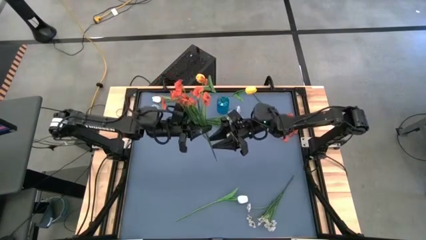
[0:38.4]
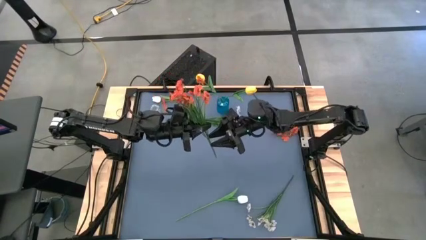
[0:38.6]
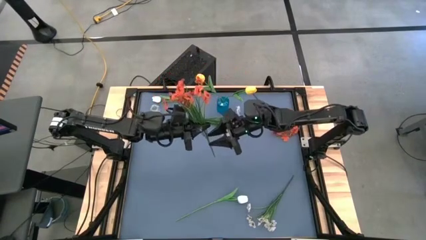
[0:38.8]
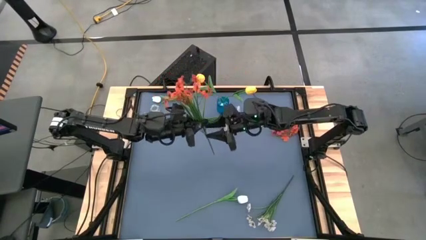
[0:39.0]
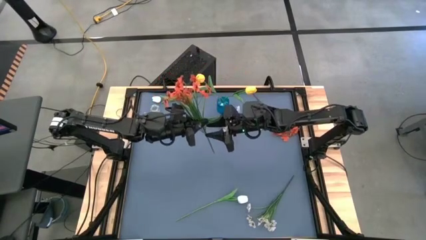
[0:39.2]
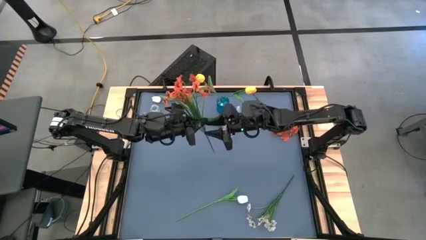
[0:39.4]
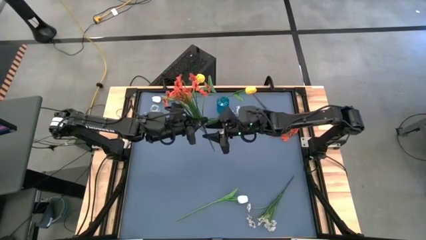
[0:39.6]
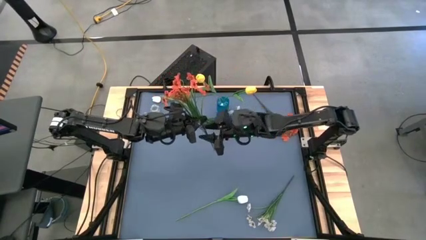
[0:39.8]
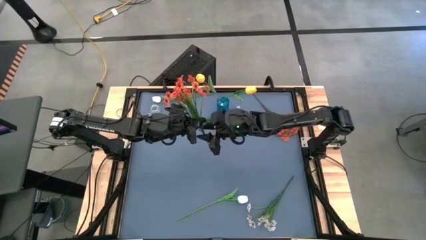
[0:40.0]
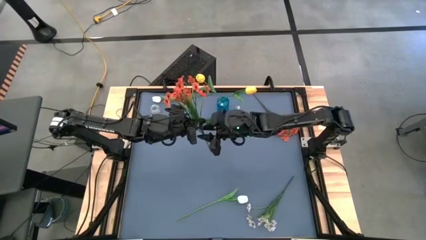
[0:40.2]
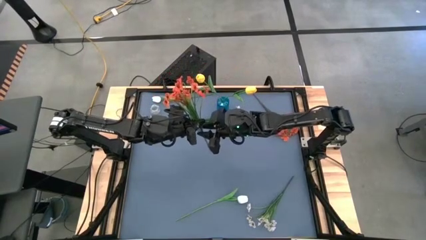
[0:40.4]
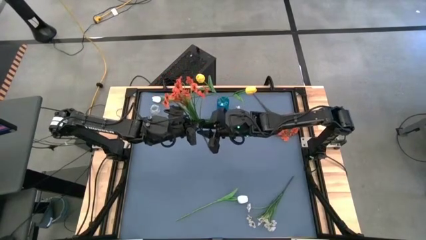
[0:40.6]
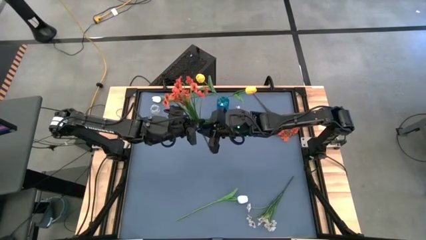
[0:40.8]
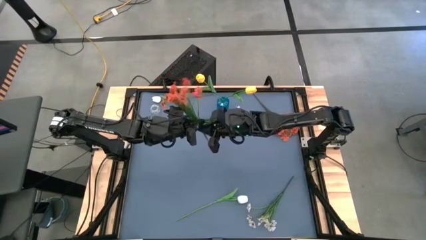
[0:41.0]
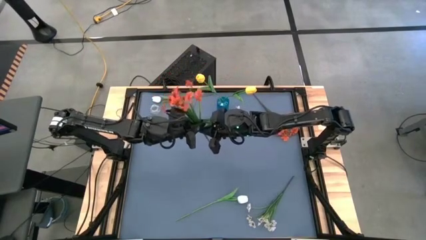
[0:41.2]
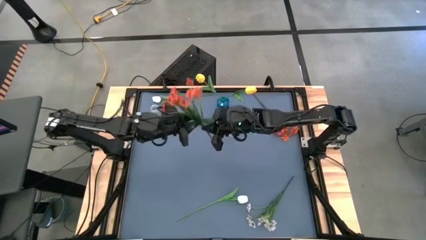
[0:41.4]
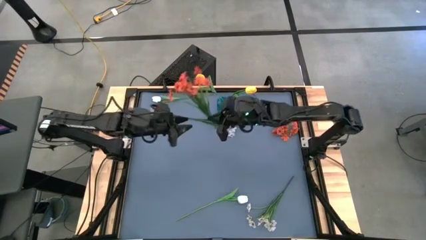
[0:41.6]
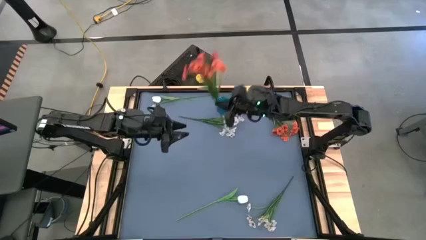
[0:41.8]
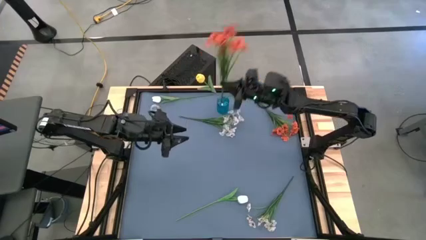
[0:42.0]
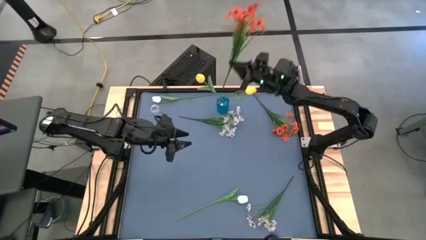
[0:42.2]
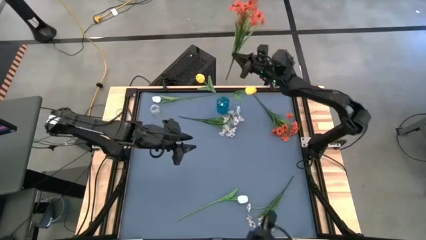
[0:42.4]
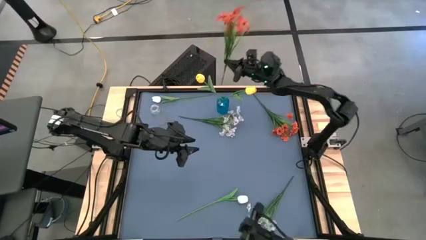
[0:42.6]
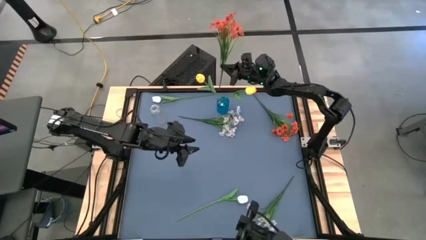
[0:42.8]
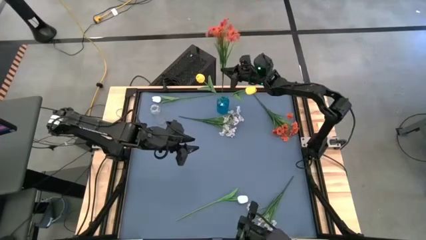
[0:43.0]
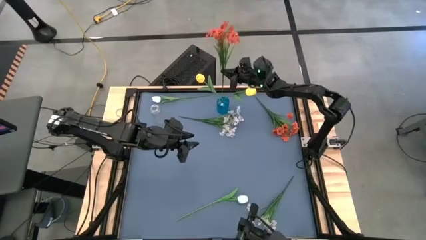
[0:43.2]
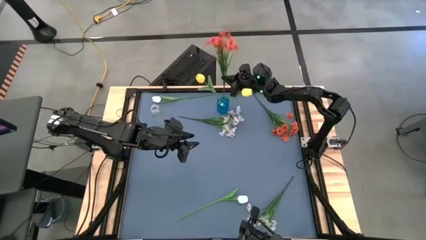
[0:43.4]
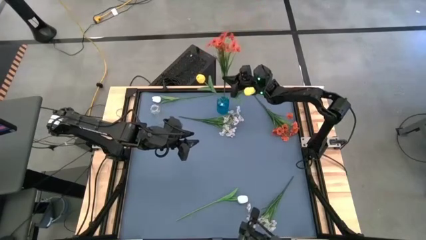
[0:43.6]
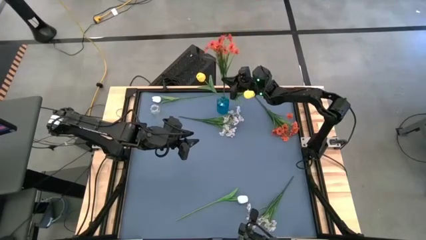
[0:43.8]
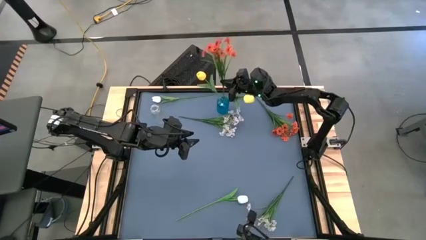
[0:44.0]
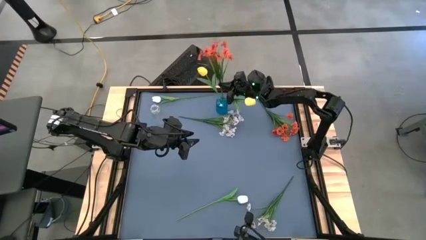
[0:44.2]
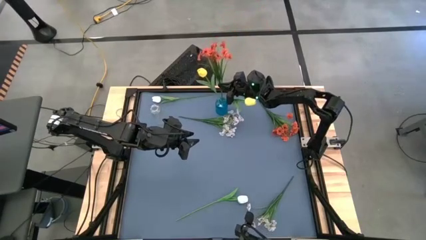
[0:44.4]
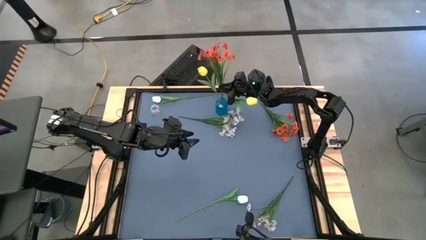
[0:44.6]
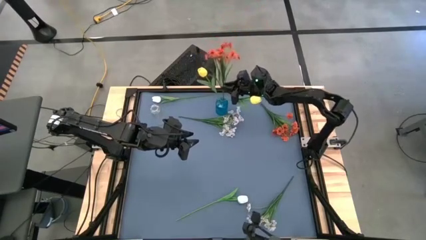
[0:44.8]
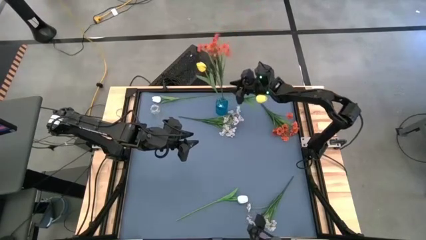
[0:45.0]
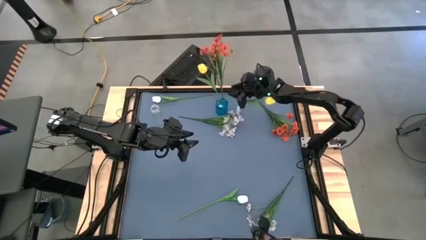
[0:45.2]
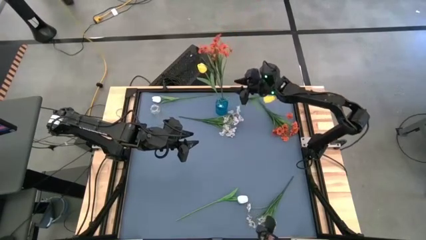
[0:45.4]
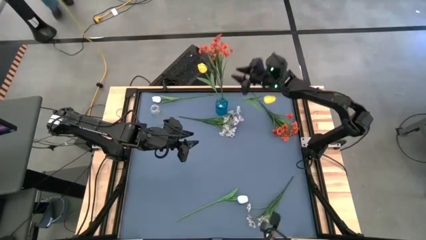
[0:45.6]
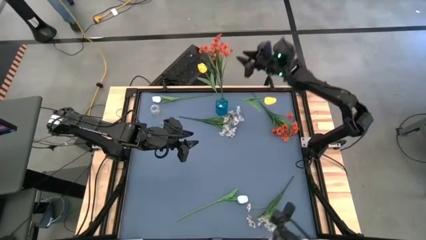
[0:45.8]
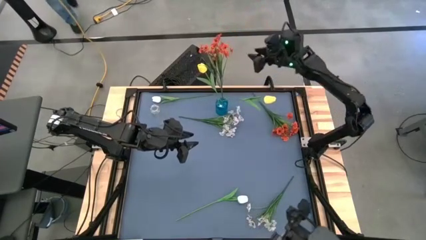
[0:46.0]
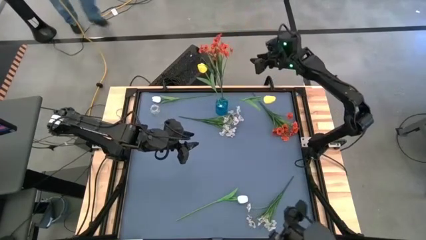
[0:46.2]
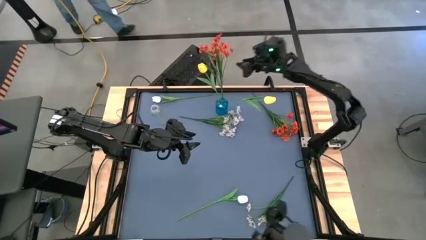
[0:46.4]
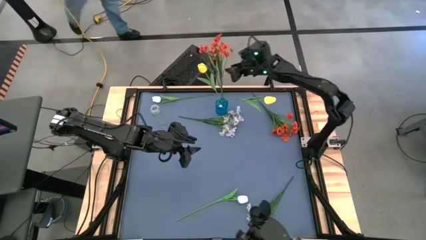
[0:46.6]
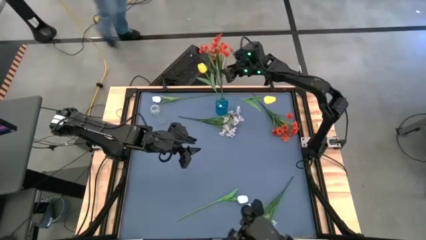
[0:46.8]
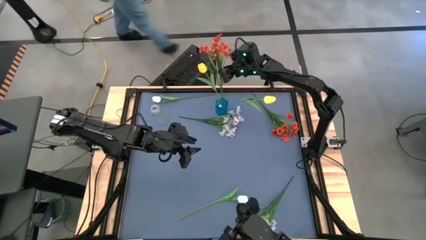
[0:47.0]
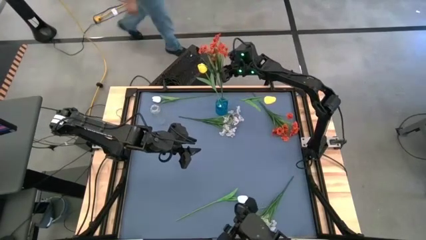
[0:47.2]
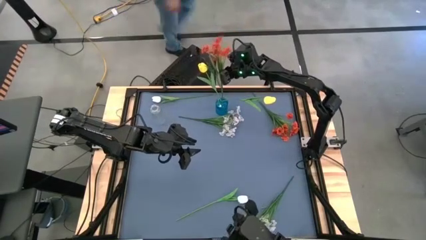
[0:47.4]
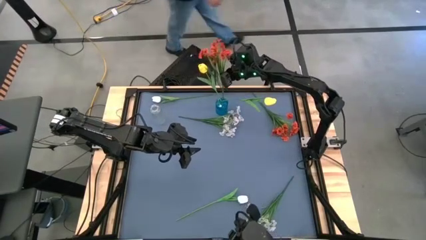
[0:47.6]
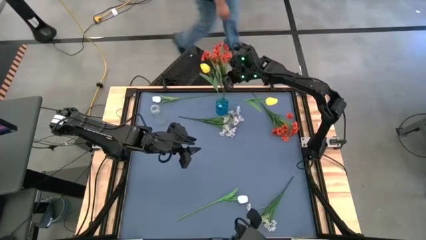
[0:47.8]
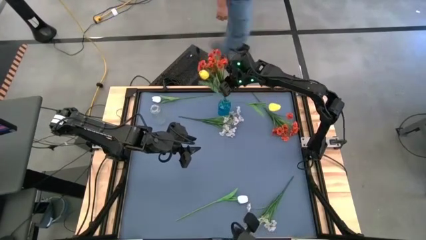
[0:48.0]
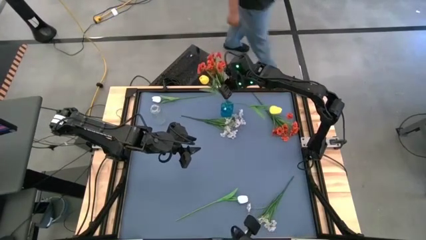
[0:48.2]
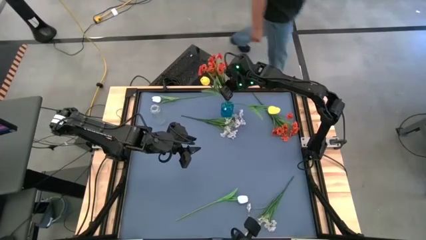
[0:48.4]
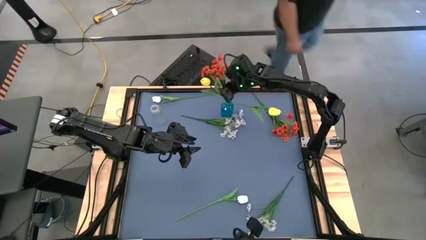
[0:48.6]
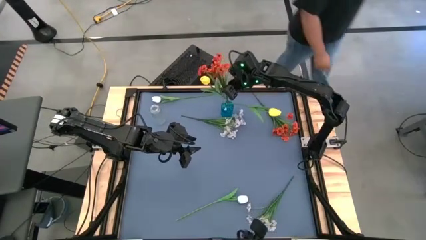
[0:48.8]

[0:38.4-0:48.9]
Task: Sort flowers into vase by color
Put the bottom orange flowers into the blue vase

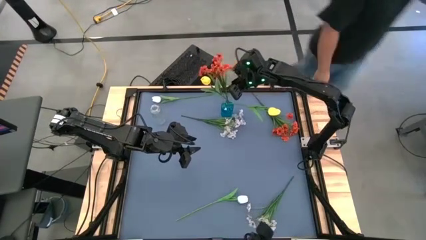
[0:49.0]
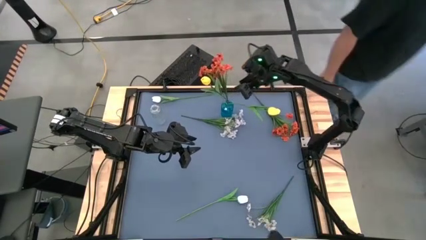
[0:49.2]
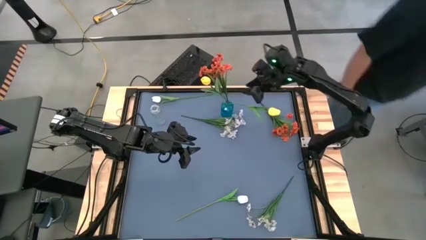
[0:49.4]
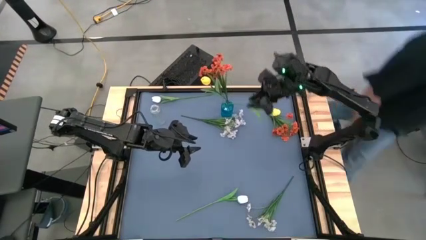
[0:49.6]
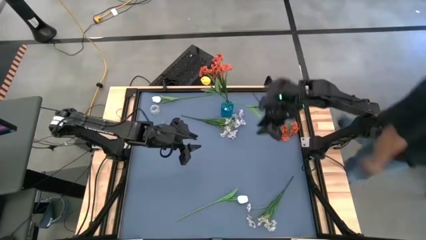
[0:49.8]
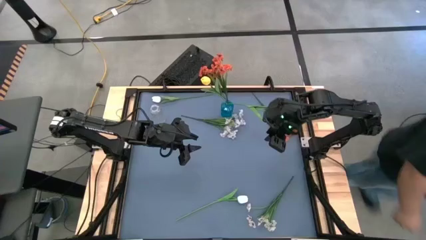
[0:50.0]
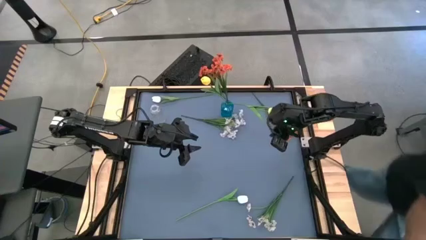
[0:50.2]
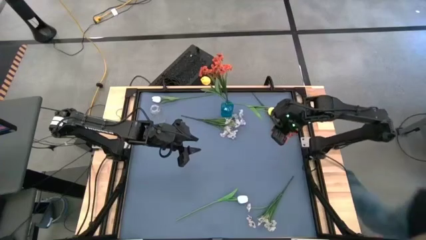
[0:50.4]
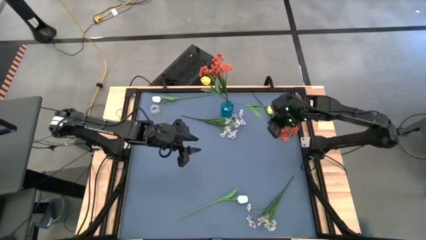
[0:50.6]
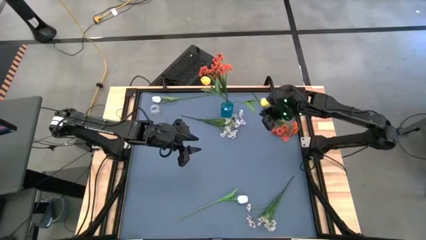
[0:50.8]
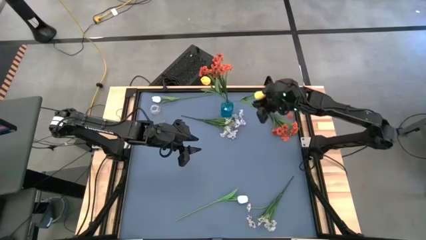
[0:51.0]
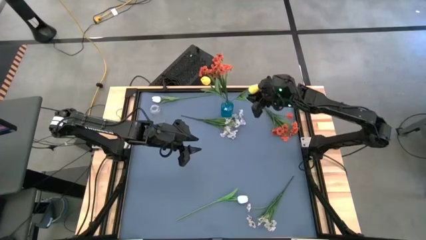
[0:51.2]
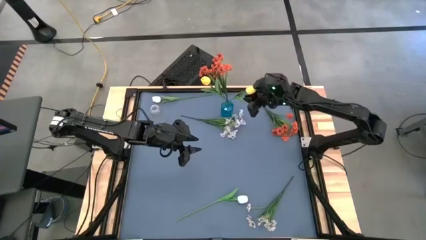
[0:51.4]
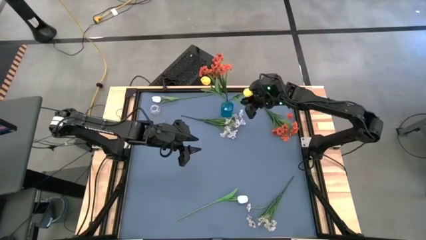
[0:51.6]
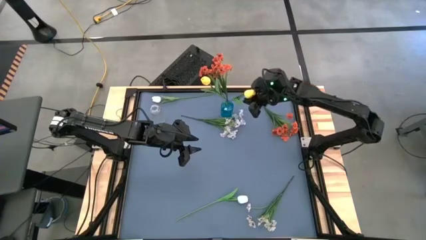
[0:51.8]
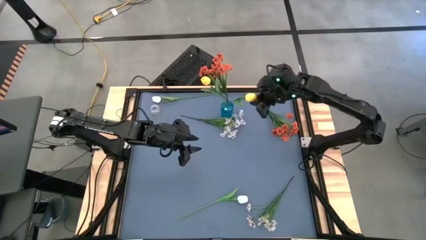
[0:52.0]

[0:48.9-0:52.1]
Adjust the yellow tulip

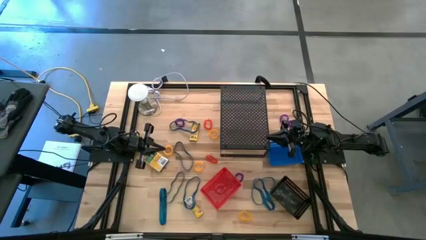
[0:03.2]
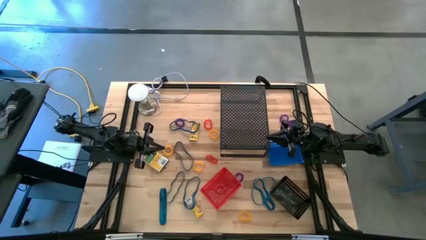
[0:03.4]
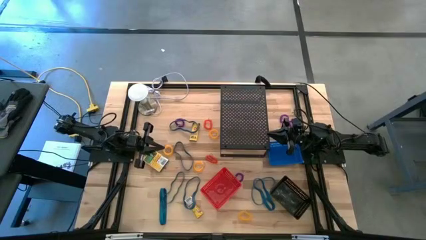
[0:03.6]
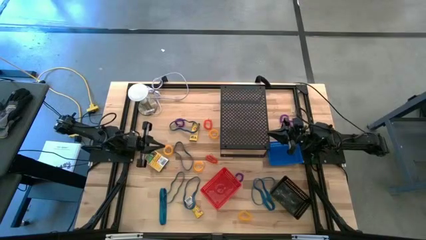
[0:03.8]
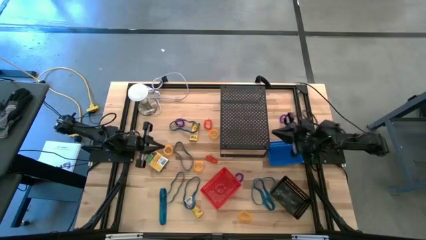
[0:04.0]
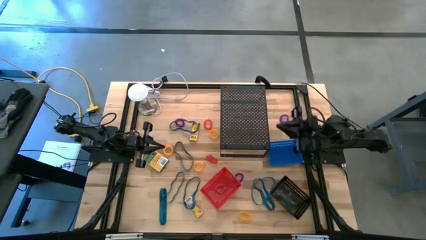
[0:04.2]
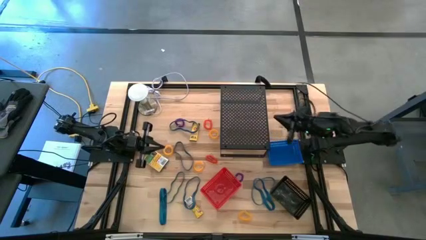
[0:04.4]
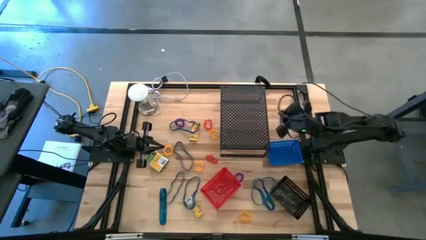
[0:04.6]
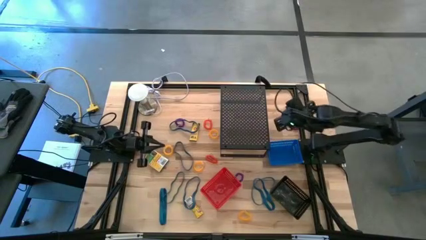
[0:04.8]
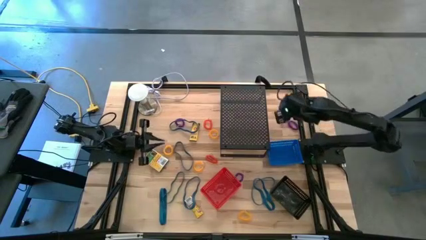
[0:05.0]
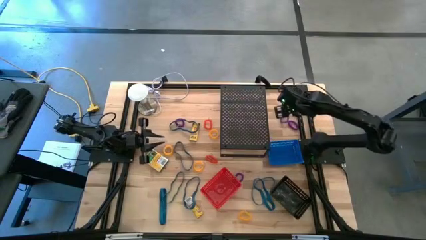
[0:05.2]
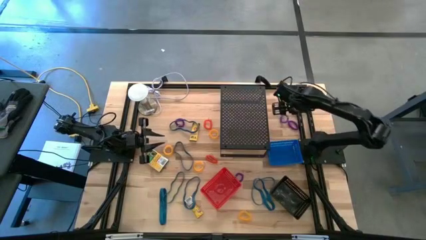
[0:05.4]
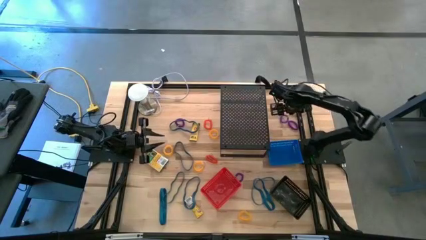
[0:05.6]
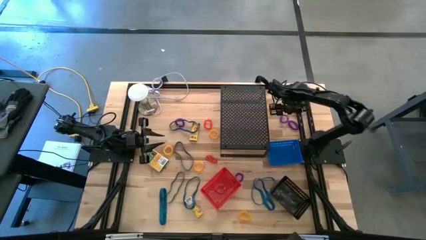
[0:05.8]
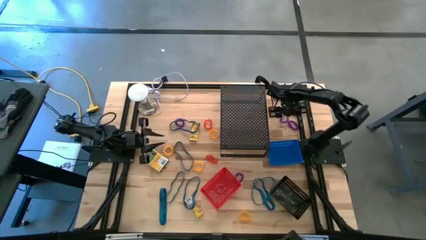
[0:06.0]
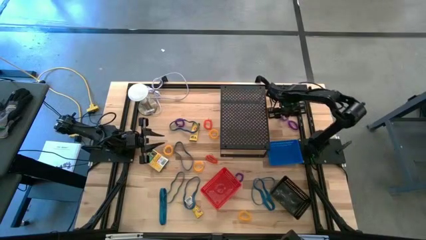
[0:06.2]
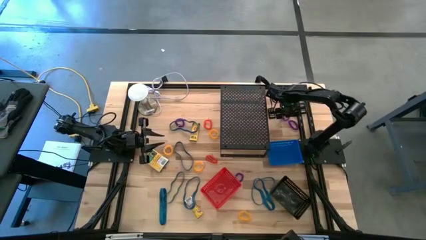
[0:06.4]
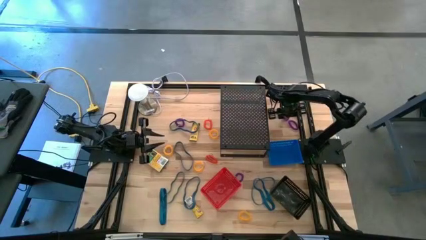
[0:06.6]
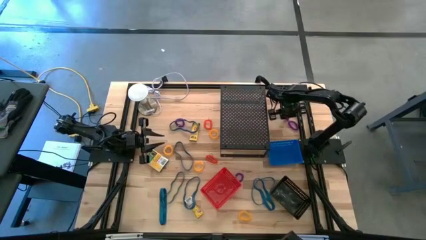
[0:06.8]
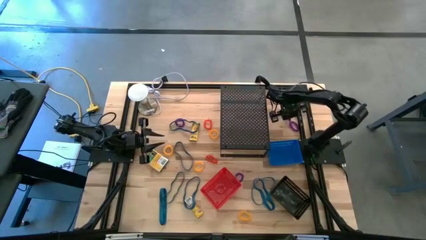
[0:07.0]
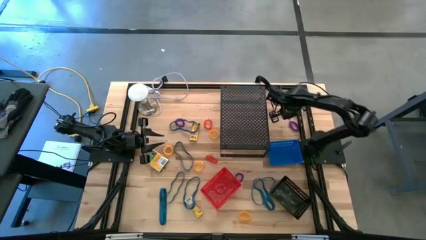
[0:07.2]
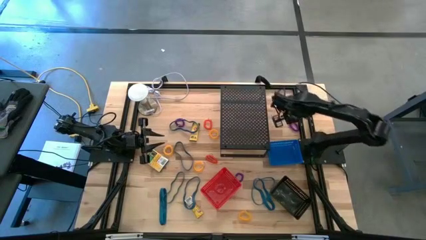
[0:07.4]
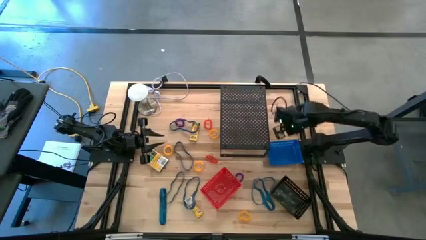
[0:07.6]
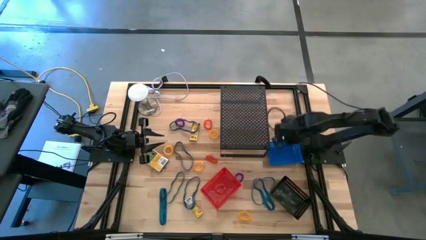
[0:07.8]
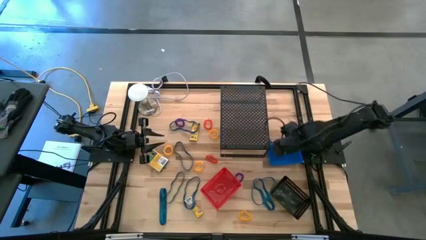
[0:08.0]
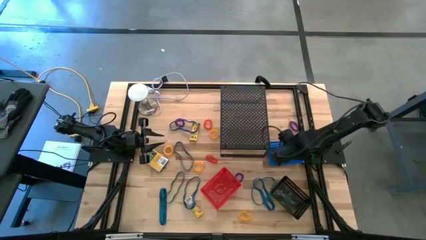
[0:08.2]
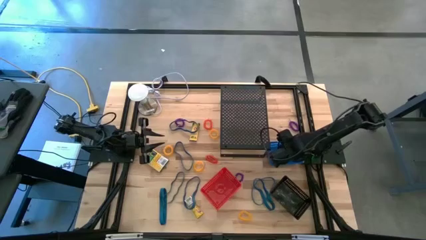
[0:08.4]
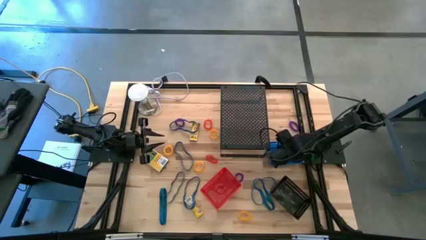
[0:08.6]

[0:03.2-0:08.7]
Task: Pick & Place Office Desk Supplies
Put the purple spring keychain into the blue basket
